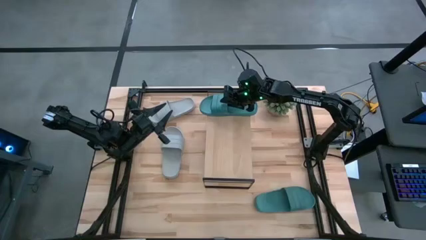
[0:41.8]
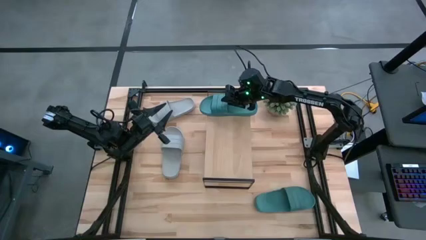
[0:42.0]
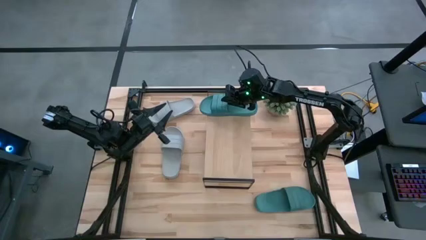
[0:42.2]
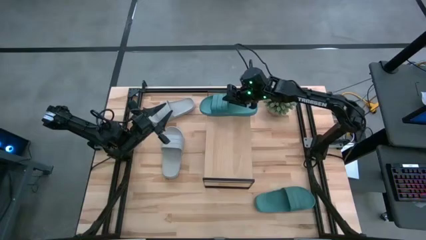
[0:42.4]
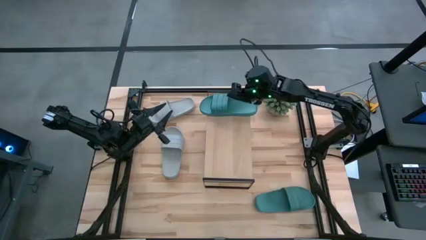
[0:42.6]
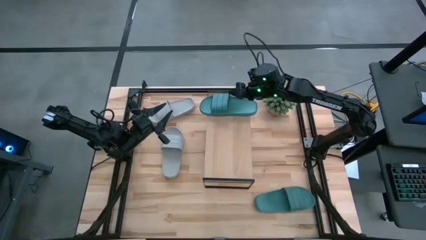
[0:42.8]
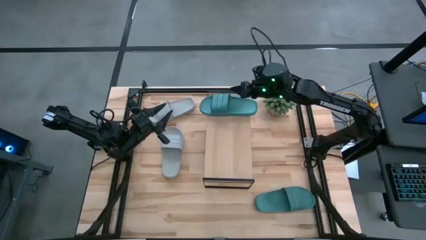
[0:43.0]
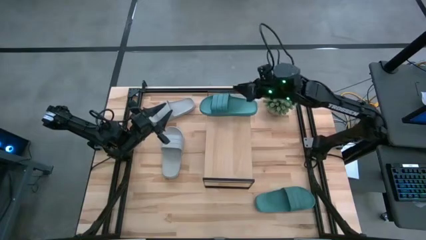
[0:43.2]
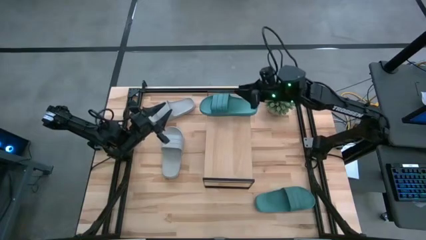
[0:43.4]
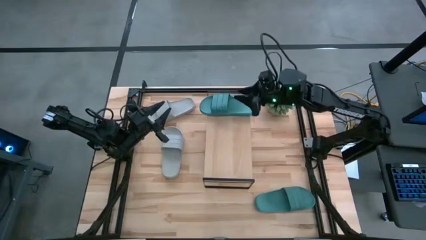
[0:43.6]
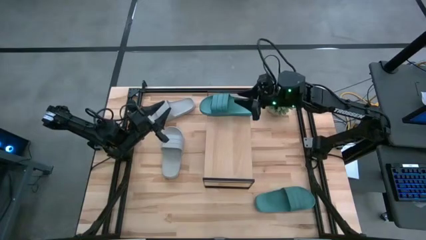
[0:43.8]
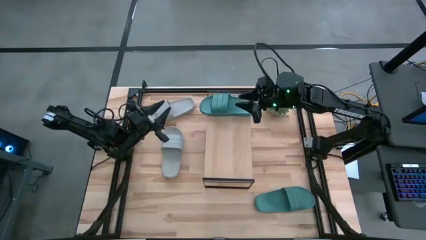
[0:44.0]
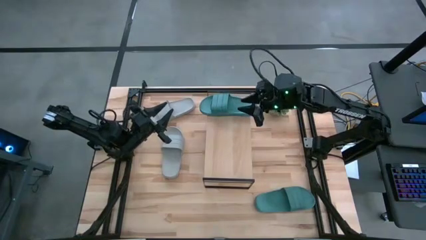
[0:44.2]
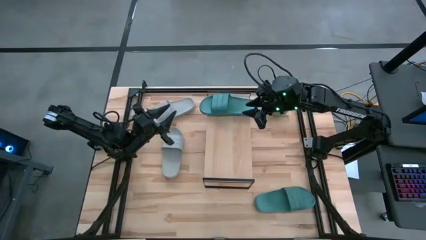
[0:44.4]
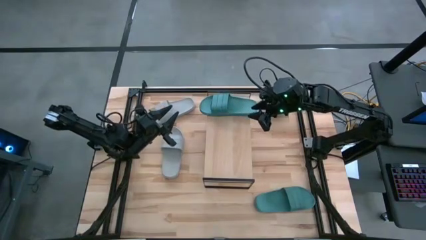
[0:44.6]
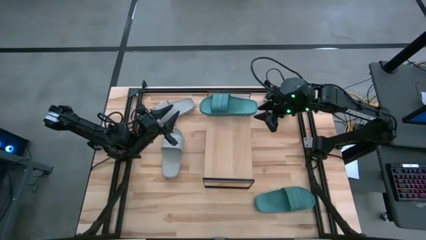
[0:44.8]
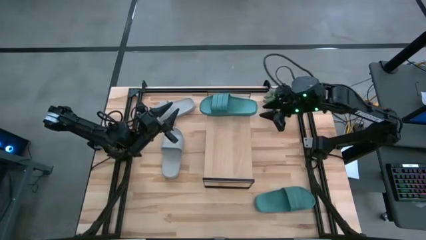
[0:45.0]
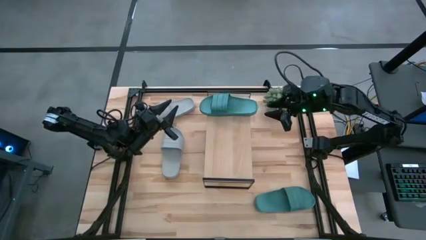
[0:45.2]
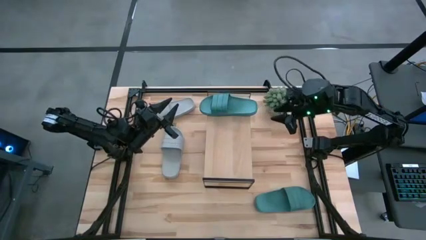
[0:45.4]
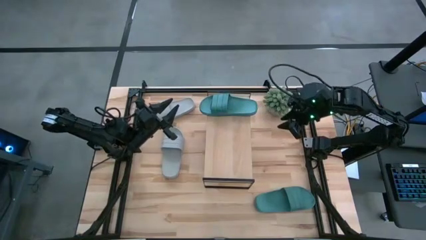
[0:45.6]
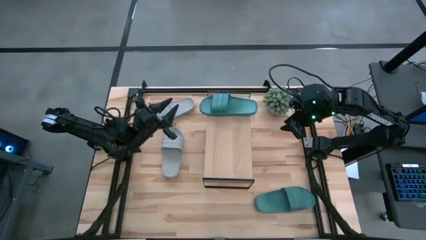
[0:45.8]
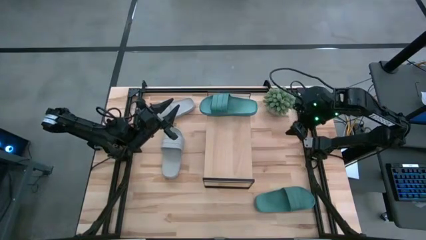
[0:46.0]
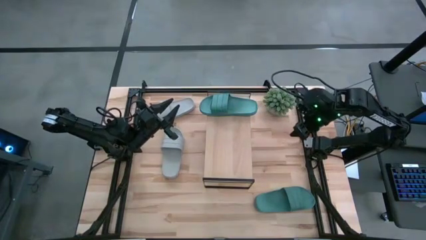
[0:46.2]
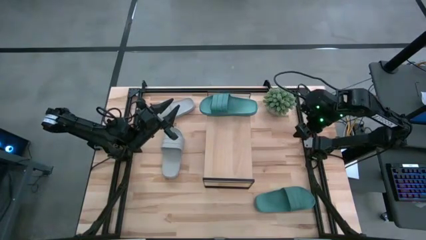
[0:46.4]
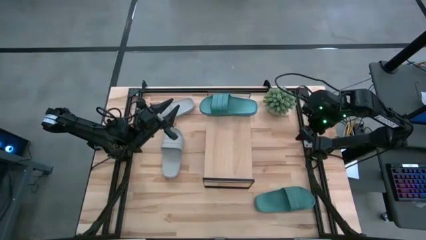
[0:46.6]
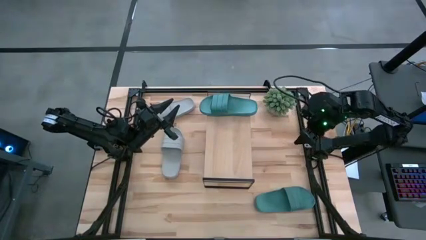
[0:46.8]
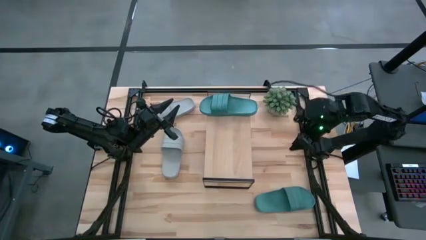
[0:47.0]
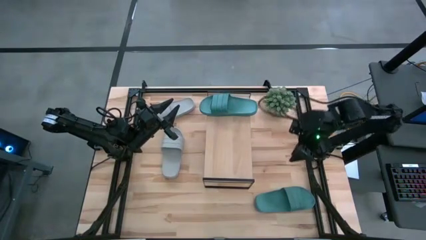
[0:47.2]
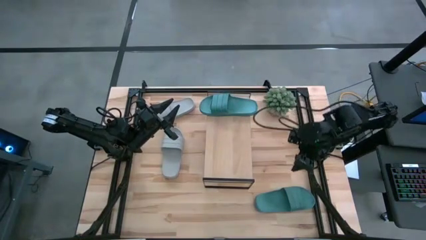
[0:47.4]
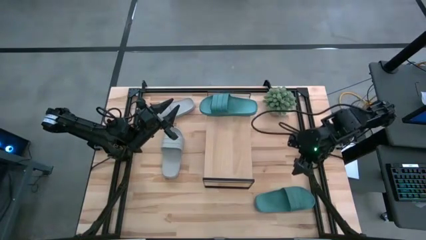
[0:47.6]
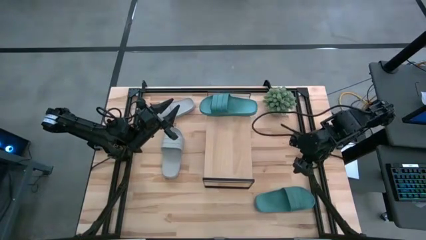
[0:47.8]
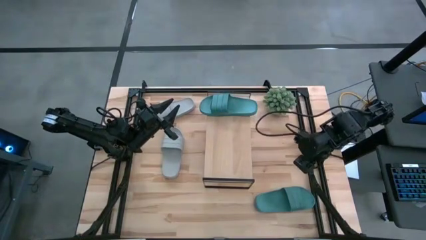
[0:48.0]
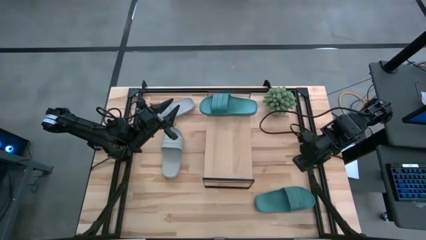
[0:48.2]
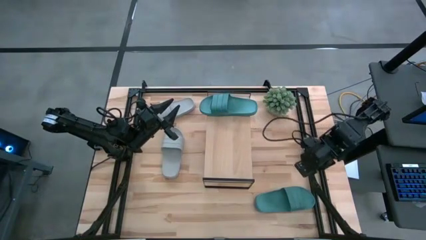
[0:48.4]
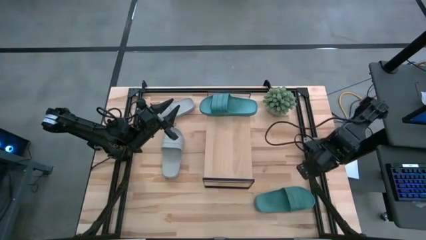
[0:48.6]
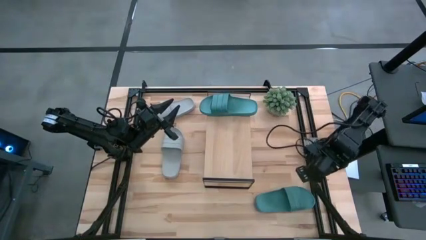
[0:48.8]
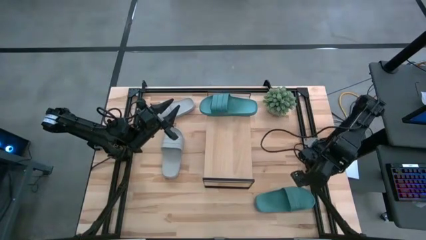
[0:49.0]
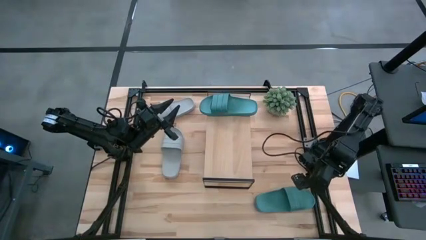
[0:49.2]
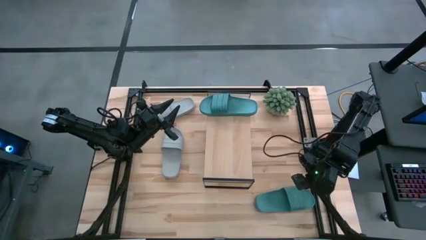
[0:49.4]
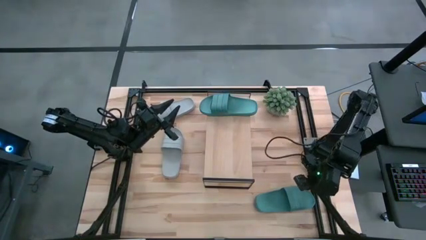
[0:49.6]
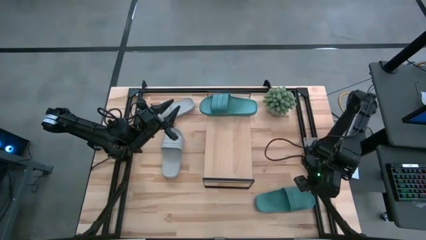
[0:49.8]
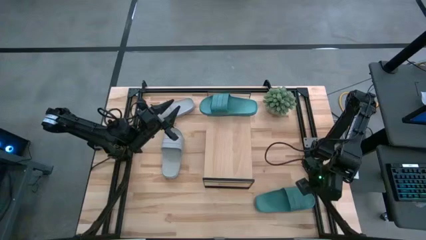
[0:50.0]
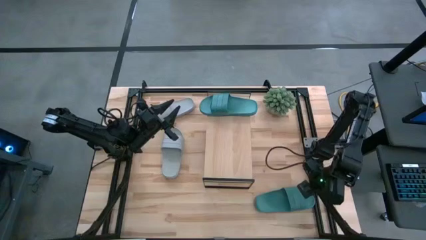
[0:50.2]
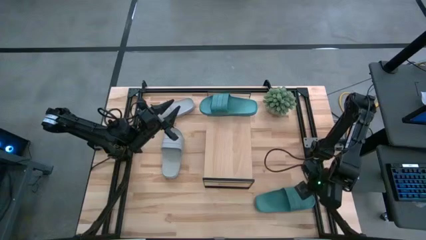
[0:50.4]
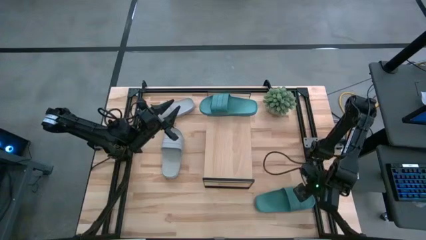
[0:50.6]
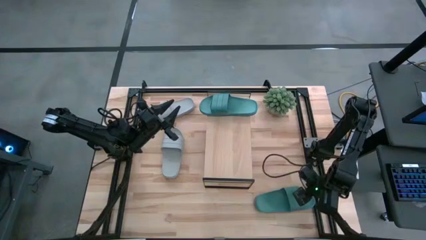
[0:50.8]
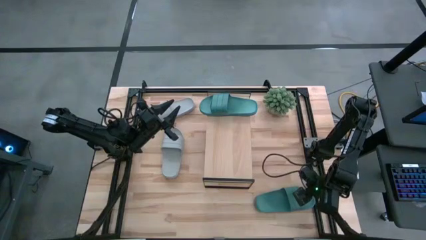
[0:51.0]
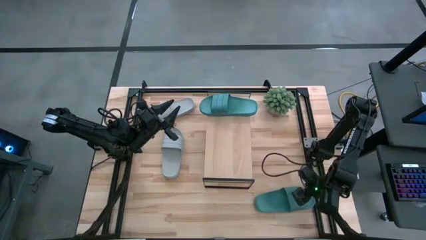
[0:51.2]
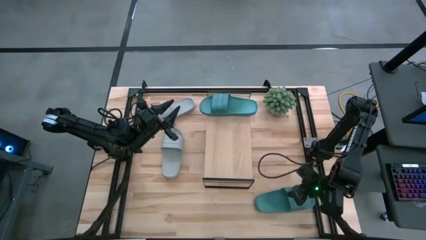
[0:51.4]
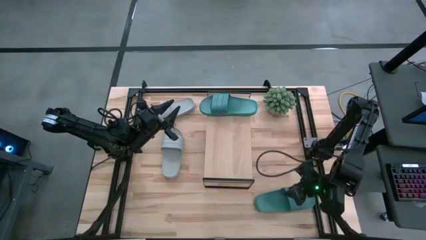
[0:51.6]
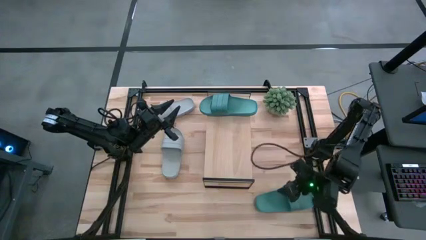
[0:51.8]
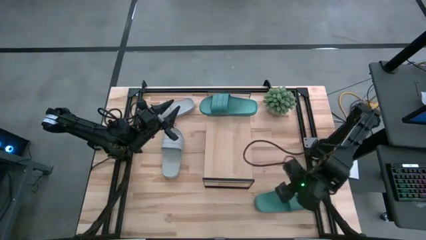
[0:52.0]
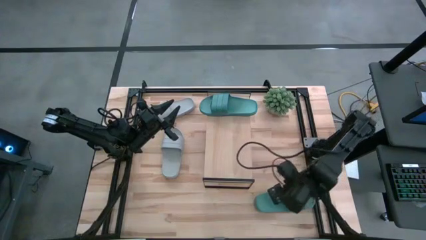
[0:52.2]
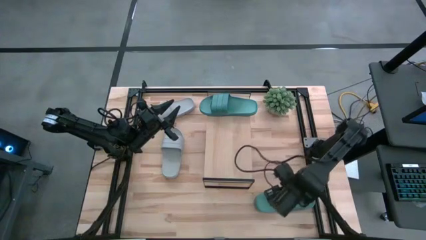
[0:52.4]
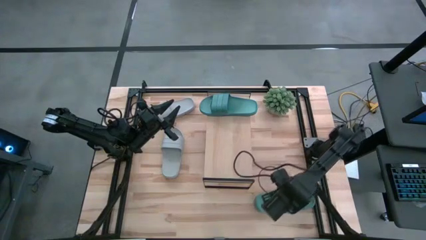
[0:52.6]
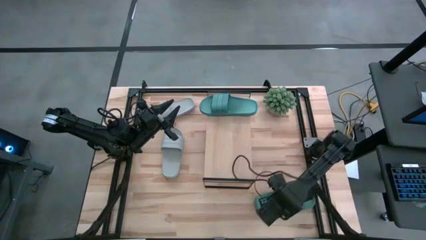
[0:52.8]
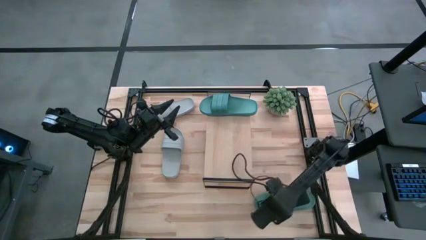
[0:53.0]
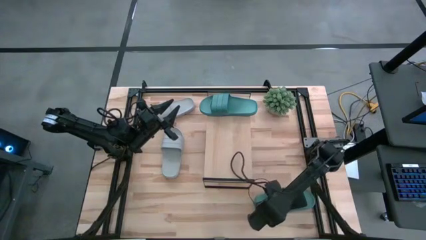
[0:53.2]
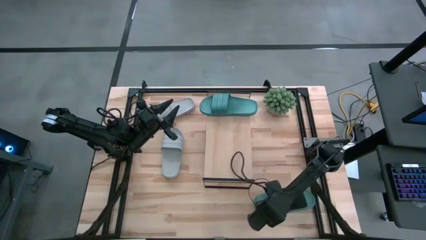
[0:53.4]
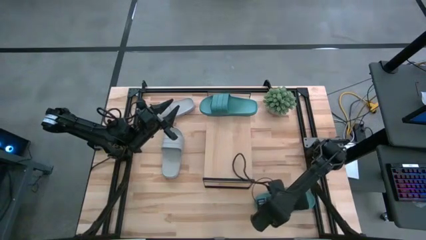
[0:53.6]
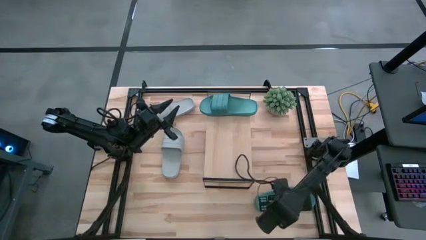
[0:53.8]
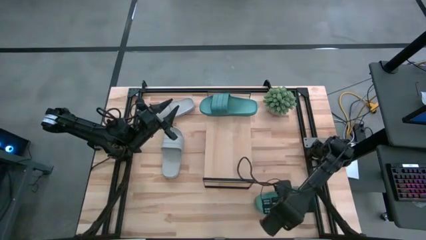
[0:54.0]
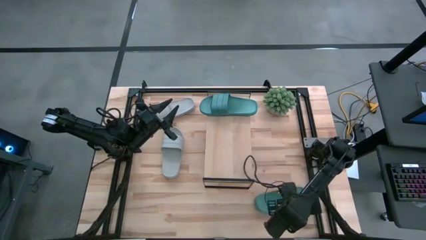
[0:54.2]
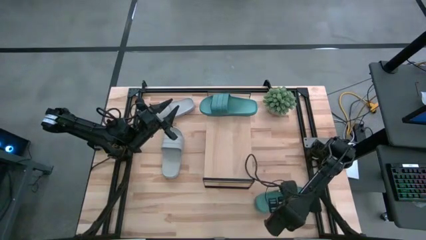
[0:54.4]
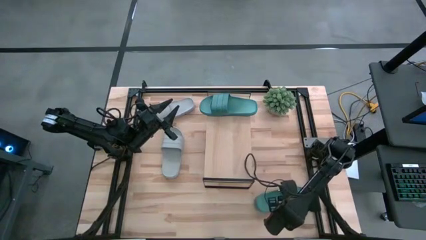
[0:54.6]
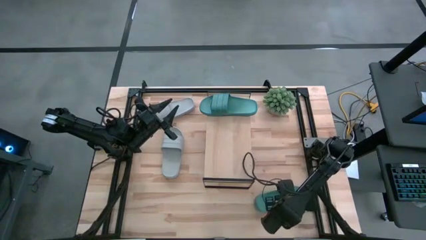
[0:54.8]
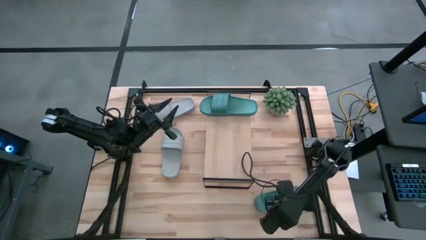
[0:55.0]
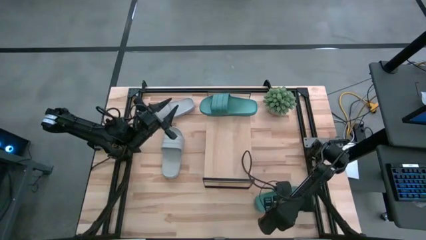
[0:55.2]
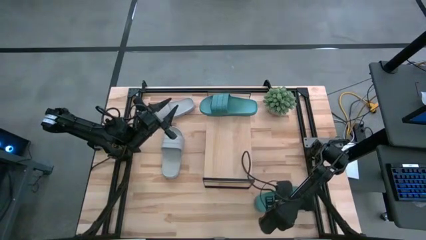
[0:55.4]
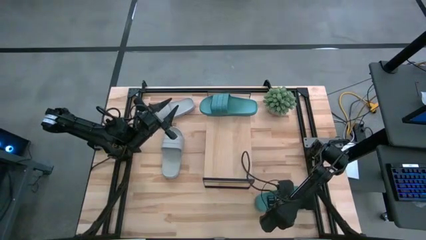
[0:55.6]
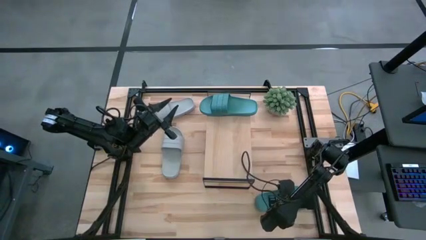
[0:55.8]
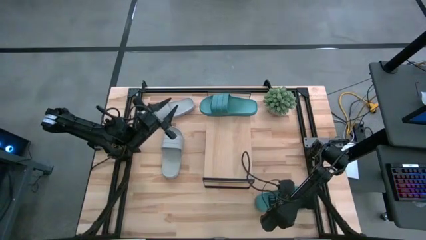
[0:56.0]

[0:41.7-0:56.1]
Task: Pick and place slides into the shelf
Put the green slide on the shelf
